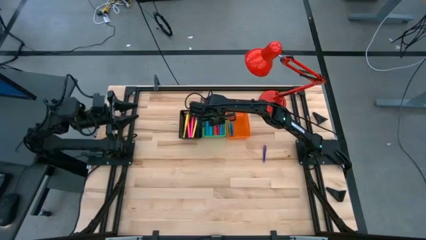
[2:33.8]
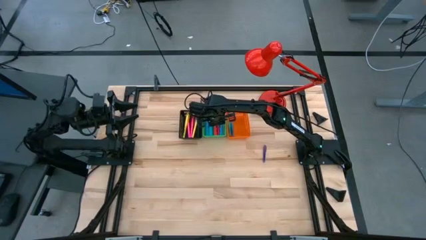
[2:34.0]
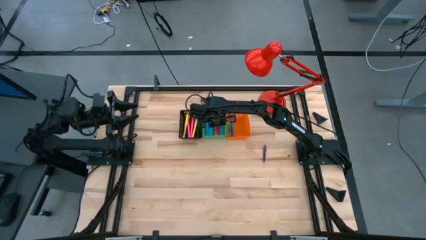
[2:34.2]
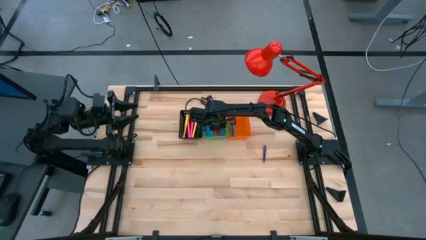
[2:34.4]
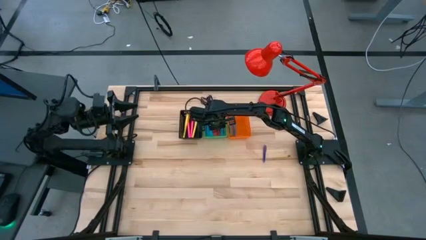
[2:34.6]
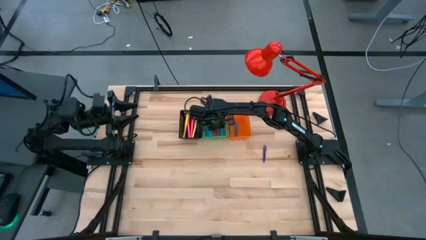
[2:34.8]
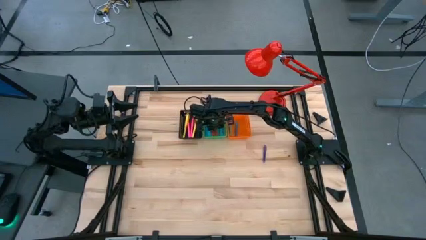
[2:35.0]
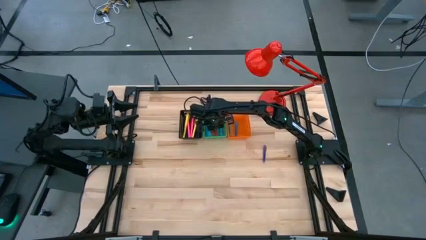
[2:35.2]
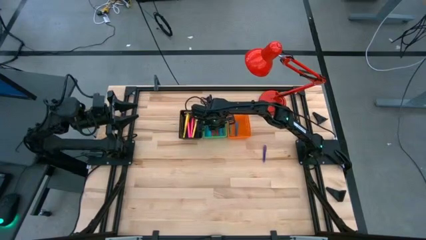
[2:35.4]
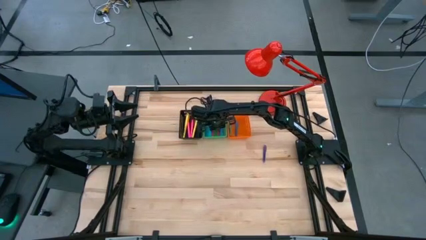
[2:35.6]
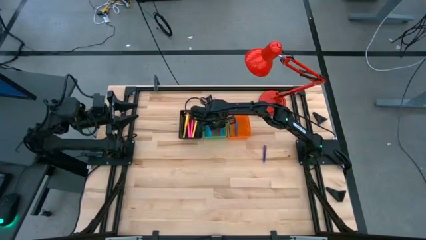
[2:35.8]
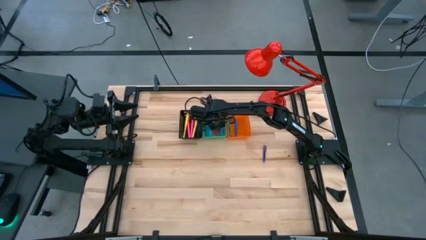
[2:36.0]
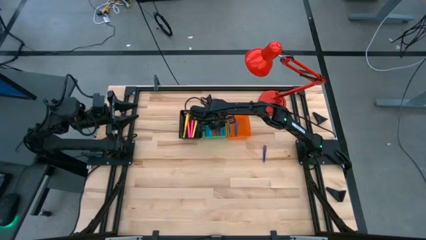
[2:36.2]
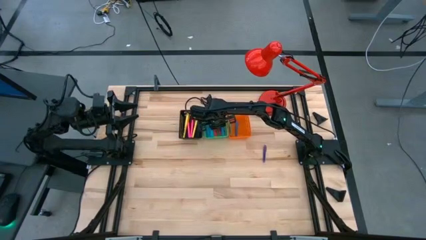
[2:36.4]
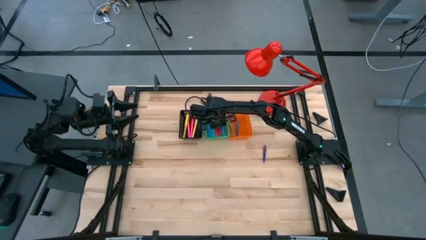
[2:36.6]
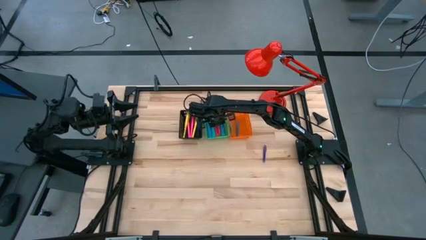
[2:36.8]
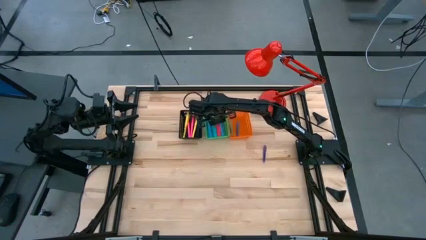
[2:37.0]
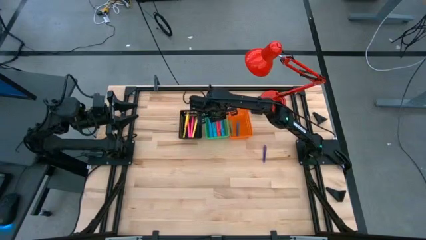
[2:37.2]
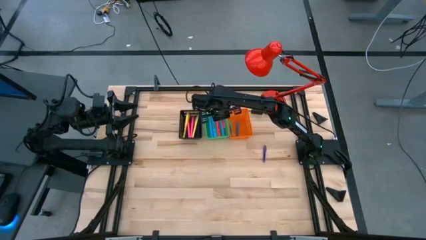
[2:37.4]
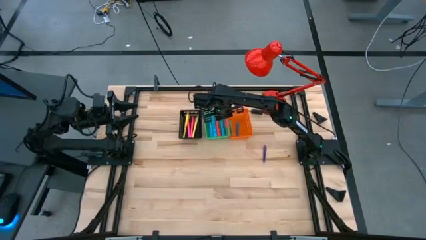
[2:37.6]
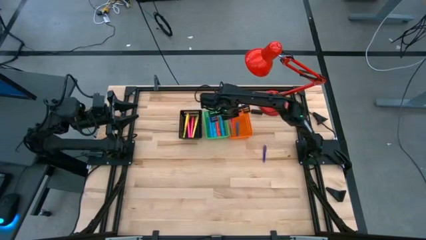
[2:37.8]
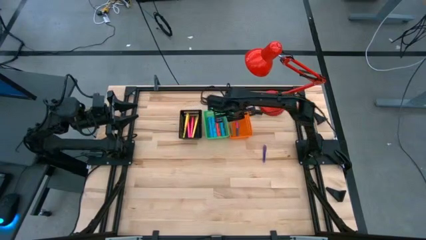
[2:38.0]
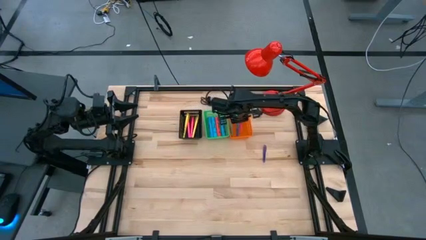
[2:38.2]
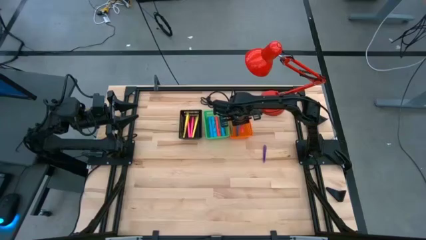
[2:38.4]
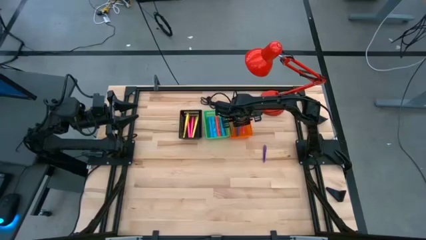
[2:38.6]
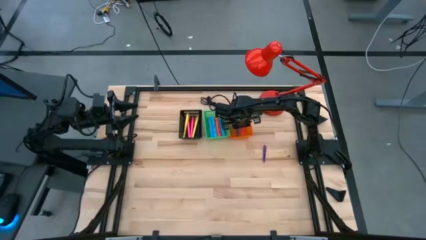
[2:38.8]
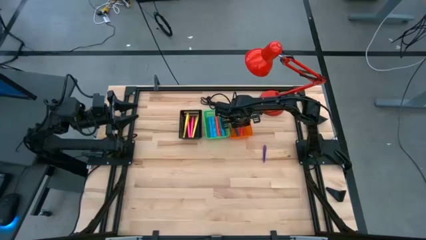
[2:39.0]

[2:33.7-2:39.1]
Task: Pick & Place Markers
Put the small pink pen into the orange bin

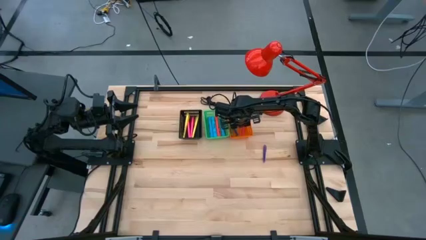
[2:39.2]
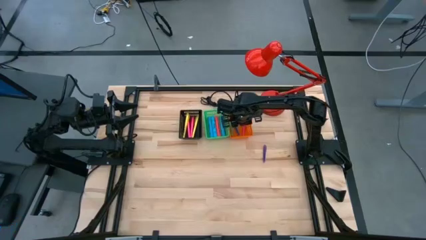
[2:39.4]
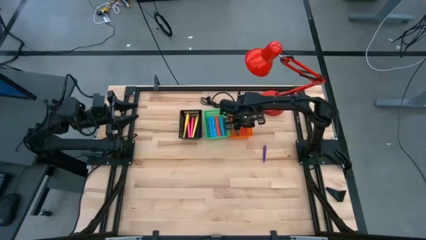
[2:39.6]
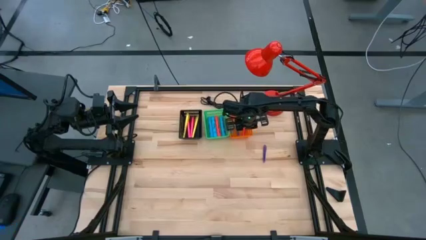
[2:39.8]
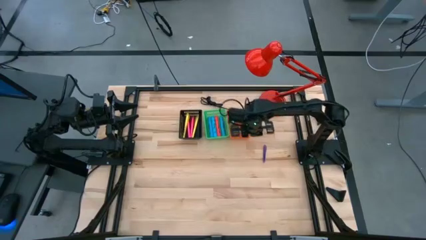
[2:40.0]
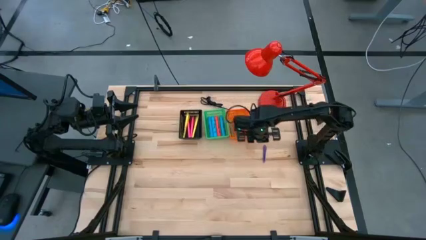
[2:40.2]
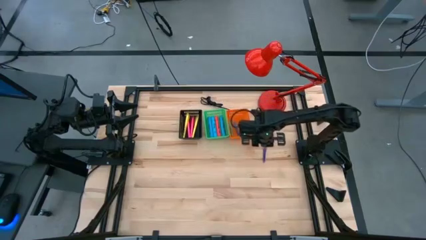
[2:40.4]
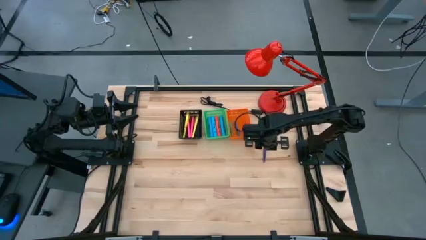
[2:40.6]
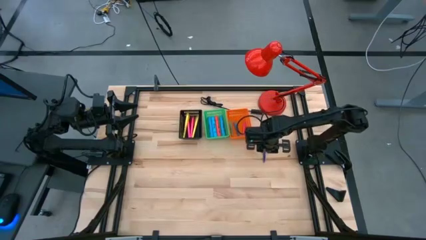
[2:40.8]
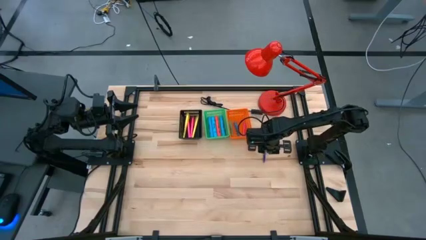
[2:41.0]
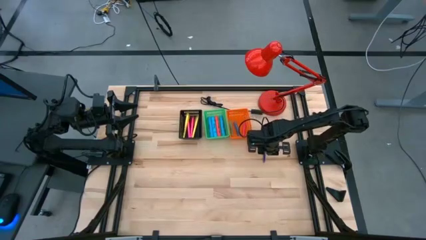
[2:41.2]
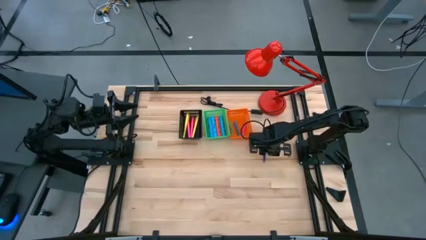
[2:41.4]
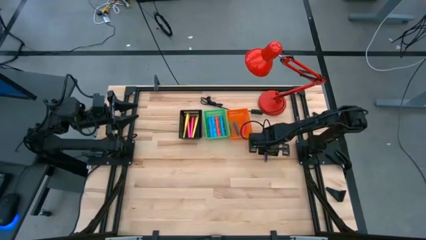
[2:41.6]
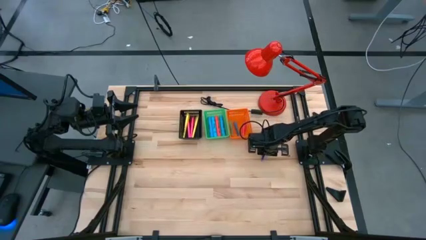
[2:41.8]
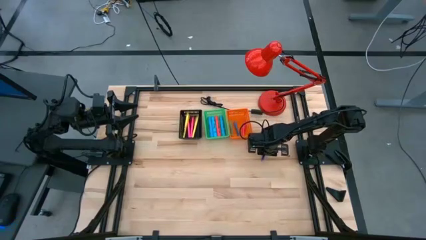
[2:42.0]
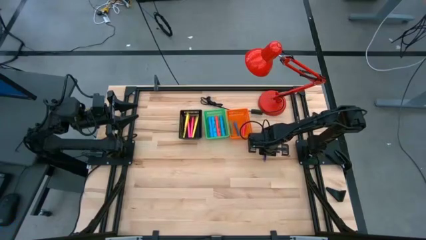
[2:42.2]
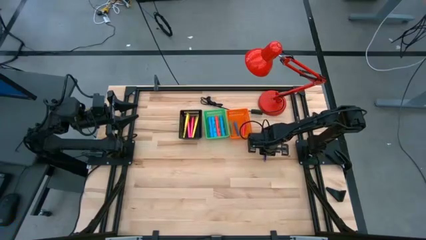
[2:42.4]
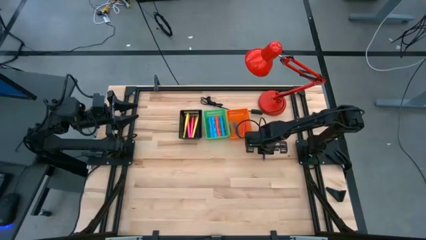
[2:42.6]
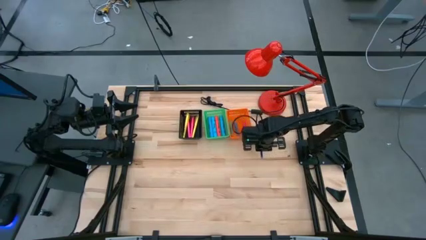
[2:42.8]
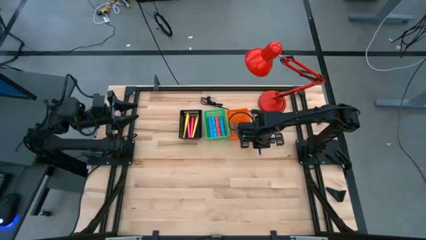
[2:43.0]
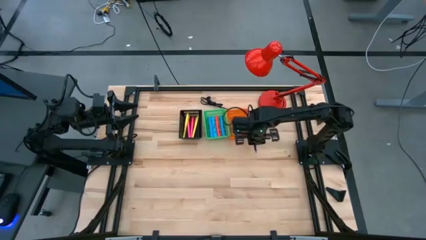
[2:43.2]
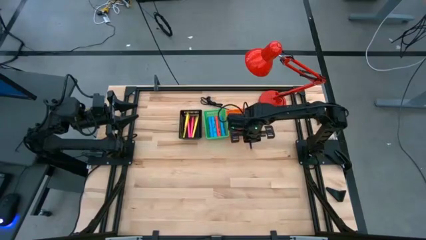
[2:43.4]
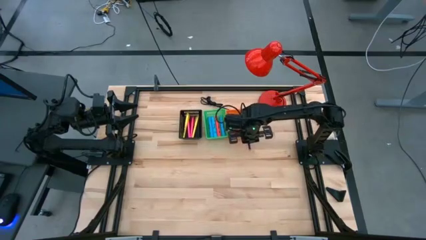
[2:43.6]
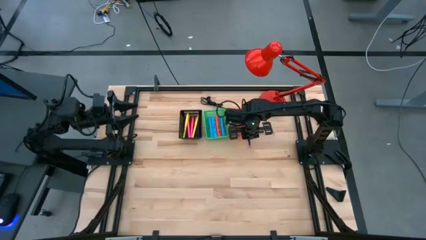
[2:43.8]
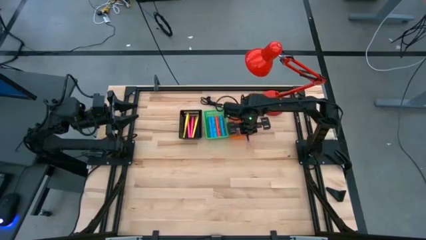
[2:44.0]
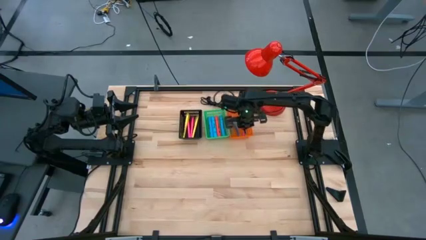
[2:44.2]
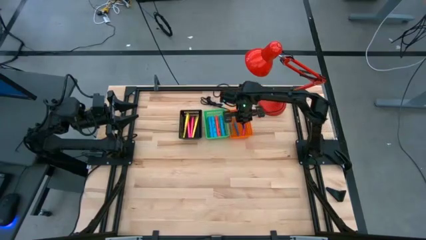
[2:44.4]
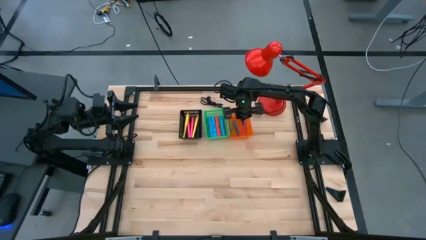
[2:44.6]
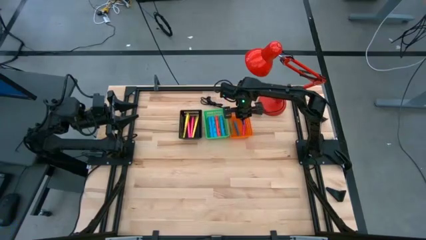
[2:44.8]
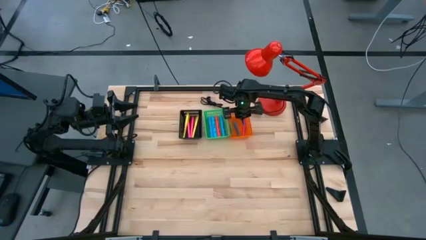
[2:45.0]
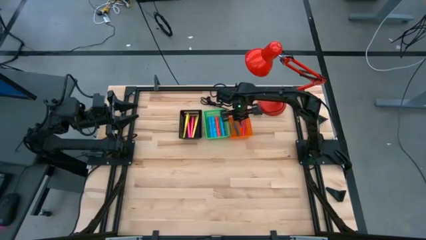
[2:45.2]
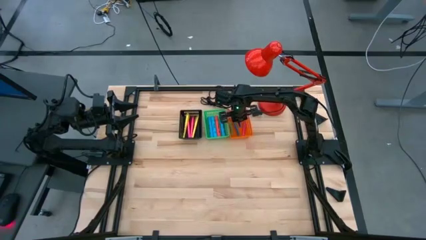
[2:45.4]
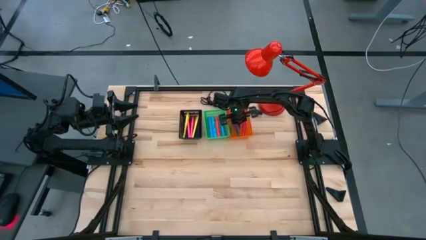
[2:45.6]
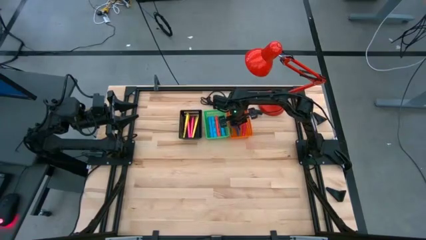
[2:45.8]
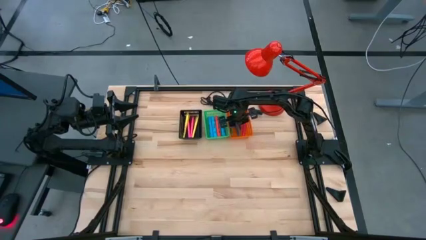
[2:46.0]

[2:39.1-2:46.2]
Put the small purple pen into the orange bin

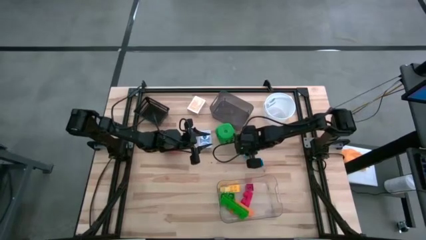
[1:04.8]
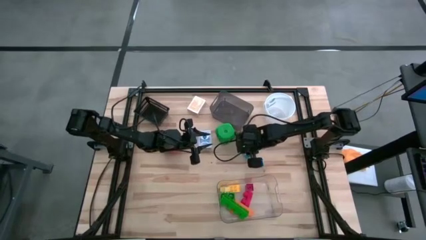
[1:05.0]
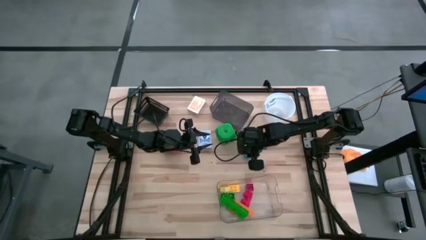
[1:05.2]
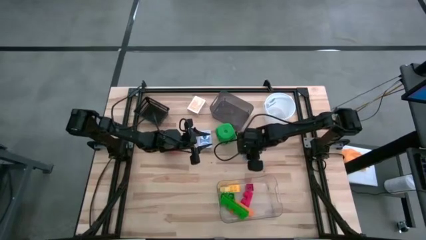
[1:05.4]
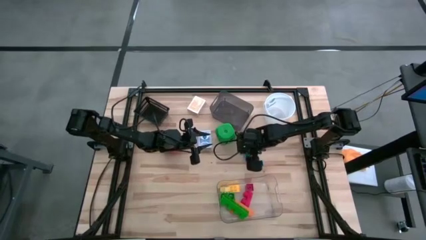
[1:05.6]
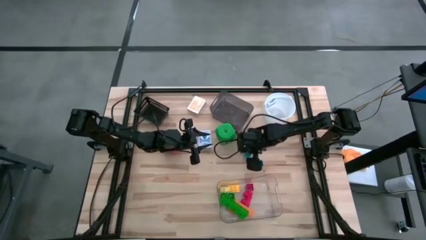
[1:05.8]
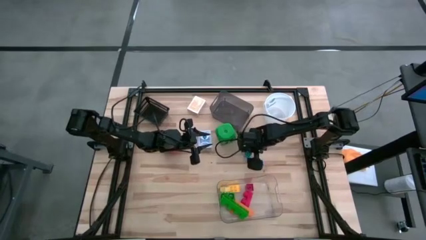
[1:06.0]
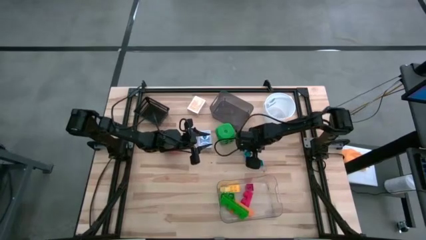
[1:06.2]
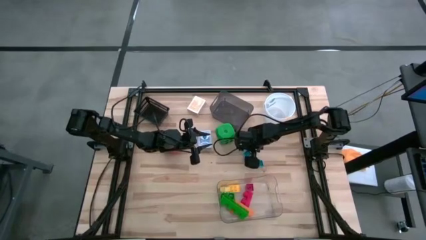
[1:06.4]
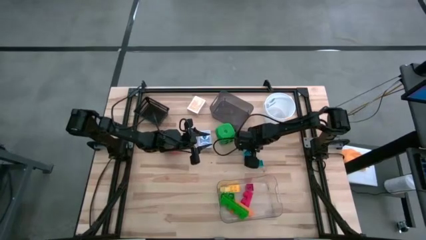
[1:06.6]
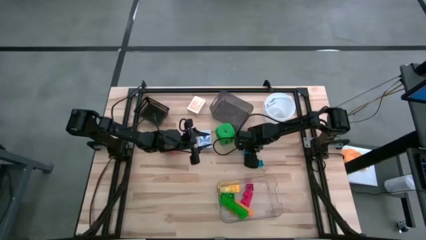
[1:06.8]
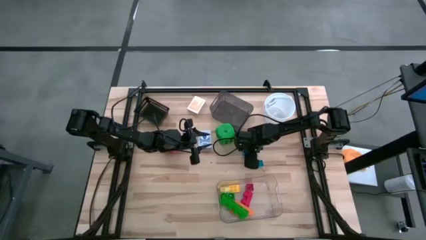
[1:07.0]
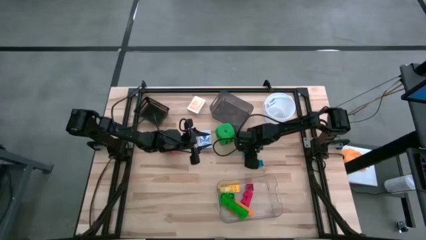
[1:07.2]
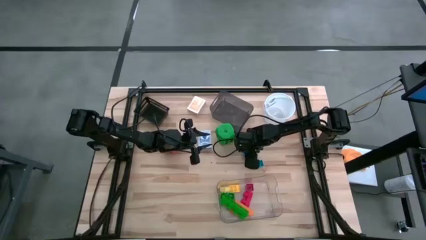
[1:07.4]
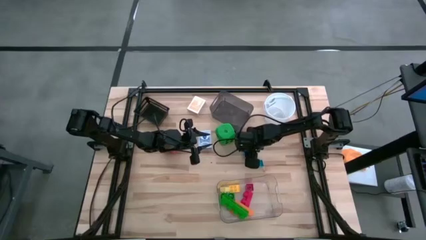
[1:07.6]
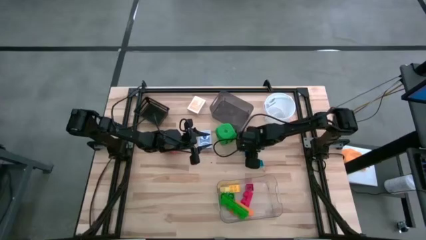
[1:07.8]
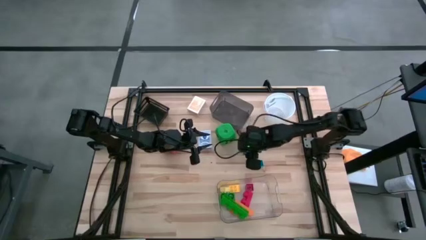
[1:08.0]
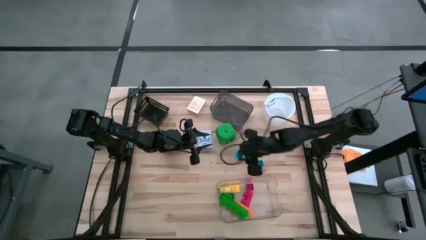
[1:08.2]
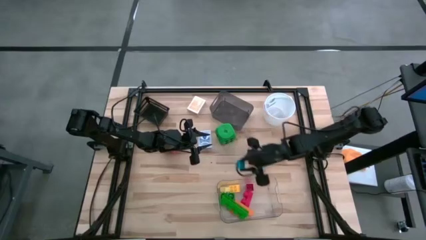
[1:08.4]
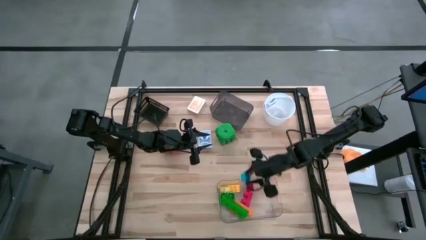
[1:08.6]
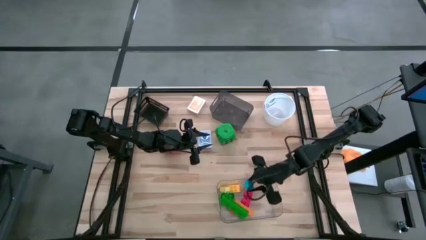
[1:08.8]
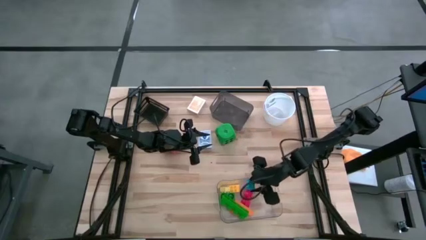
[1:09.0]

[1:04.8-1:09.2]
Task: Pick & Place Toys
Put the blue game piece into the bottom transparent bin

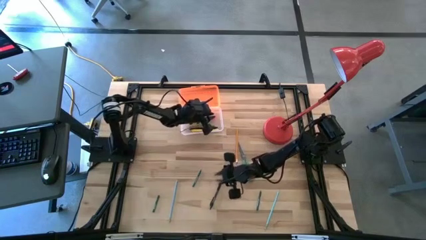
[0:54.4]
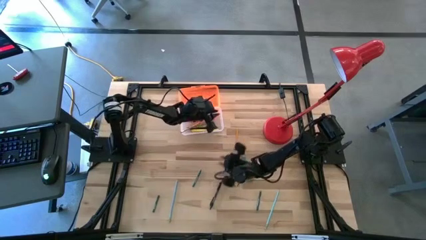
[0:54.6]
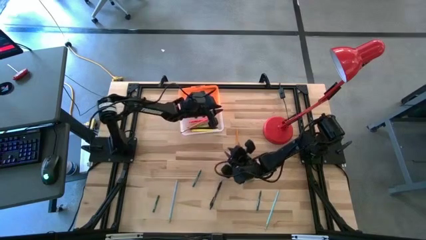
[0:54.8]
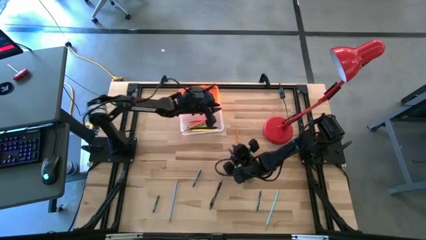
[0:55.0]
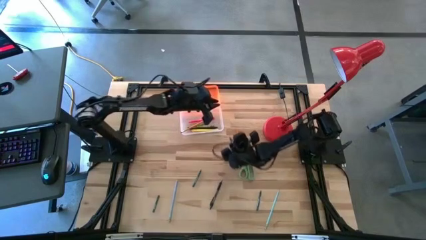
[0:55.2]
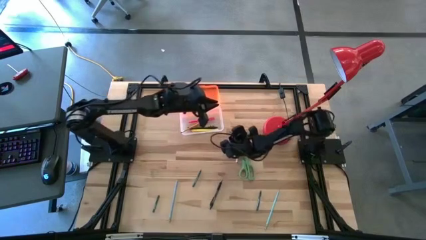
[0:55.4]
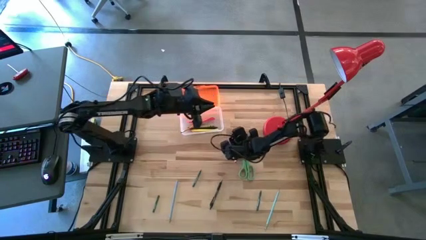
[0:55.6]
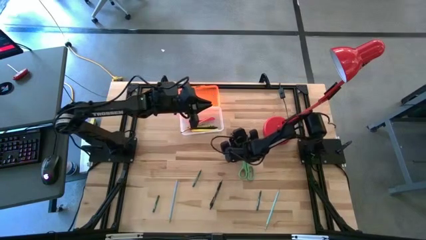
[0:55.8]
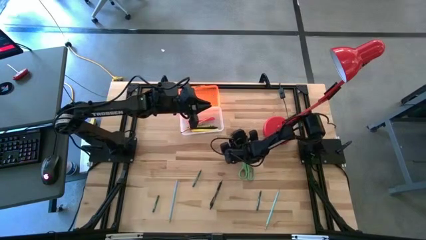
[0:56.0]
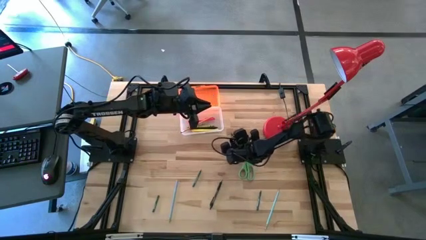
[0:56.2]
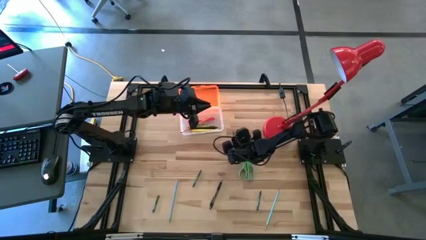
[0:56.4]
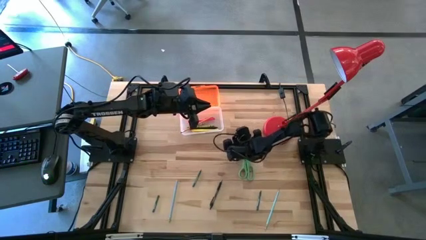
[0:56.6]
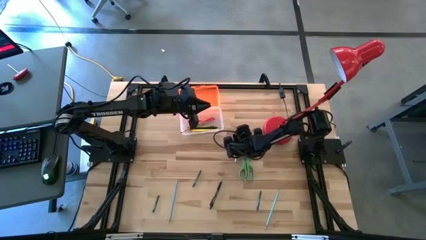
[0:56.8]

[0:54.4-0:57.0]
Task: Pick & place school supplies into a supply box
Put the orange pencil into the orange supply box
